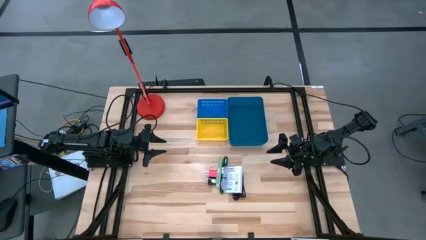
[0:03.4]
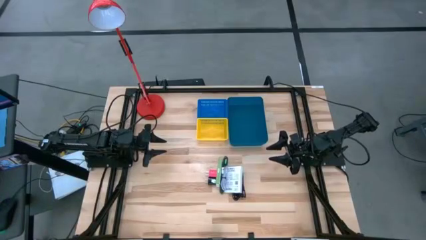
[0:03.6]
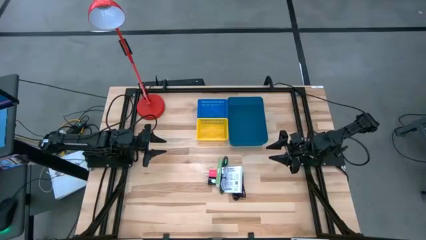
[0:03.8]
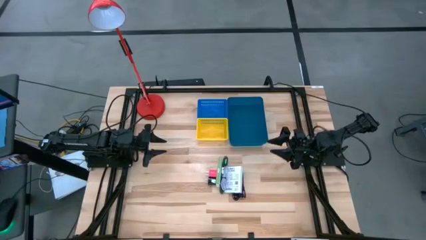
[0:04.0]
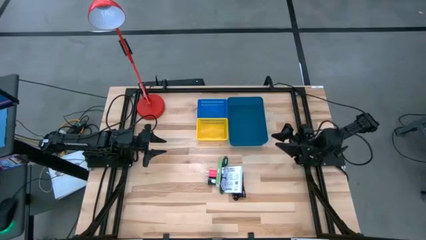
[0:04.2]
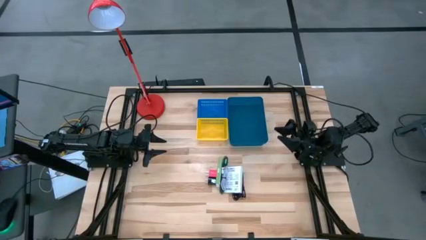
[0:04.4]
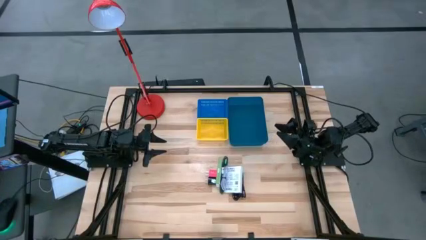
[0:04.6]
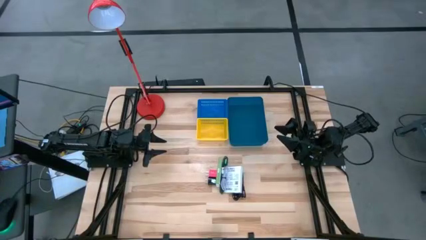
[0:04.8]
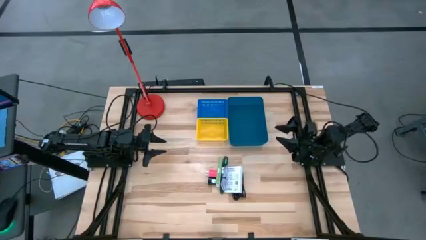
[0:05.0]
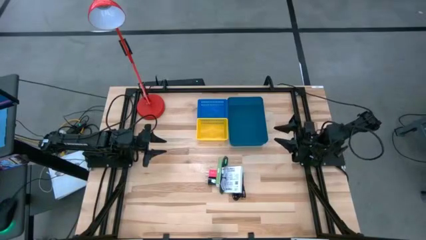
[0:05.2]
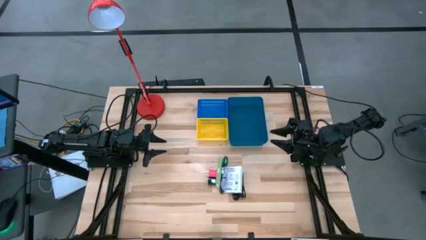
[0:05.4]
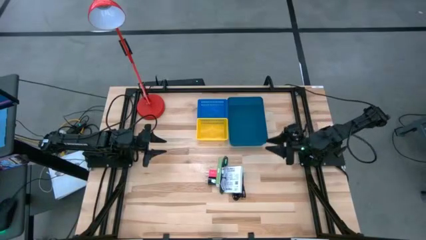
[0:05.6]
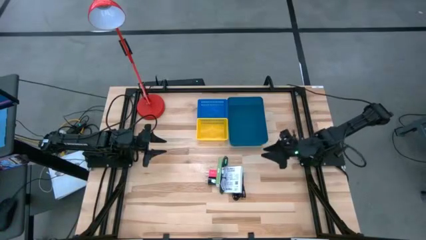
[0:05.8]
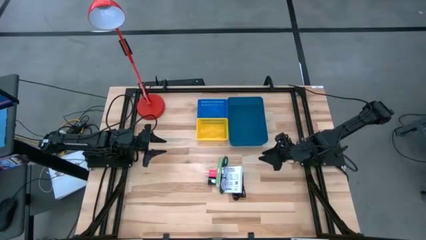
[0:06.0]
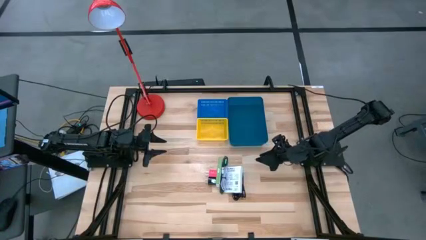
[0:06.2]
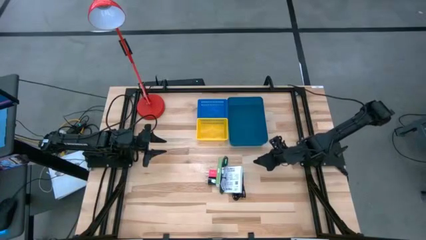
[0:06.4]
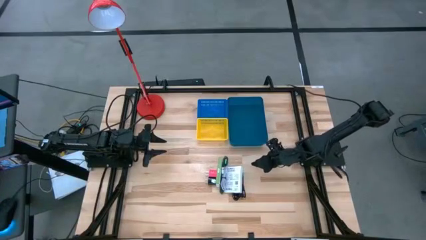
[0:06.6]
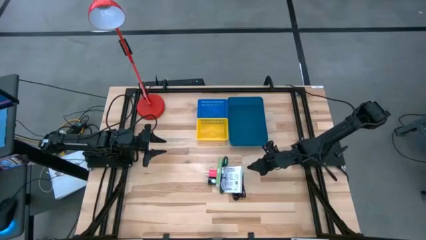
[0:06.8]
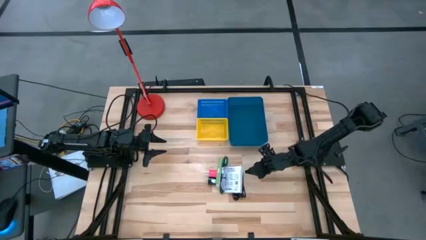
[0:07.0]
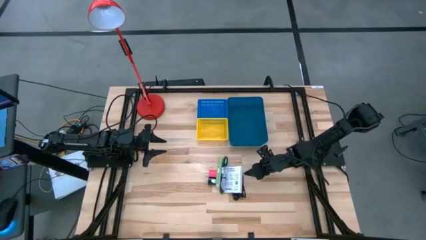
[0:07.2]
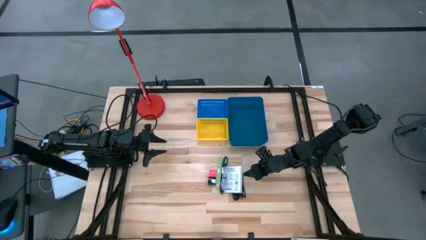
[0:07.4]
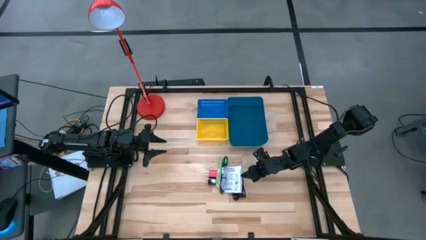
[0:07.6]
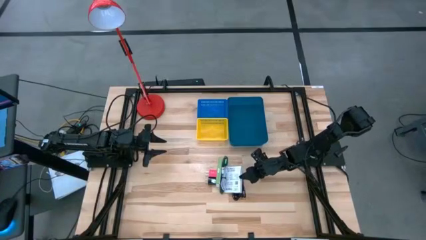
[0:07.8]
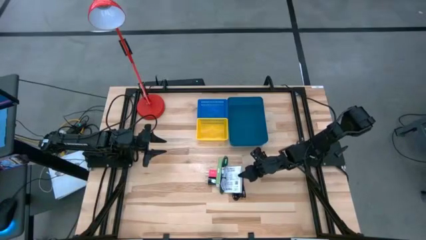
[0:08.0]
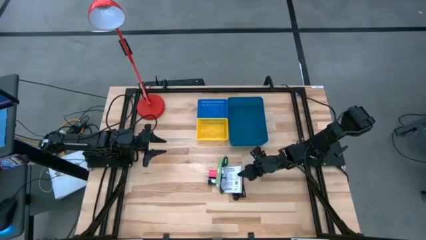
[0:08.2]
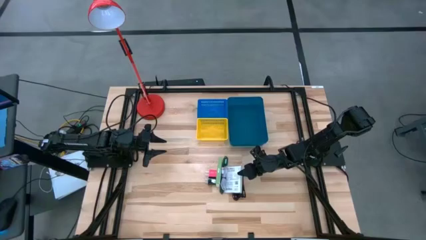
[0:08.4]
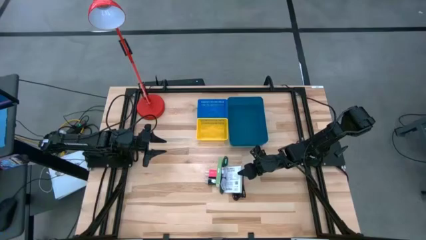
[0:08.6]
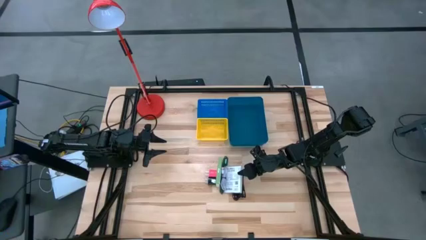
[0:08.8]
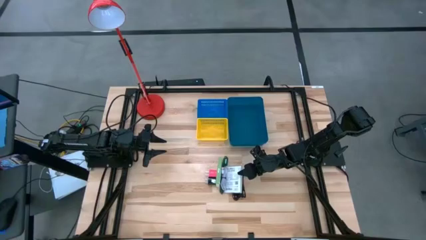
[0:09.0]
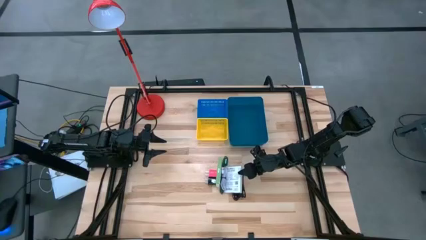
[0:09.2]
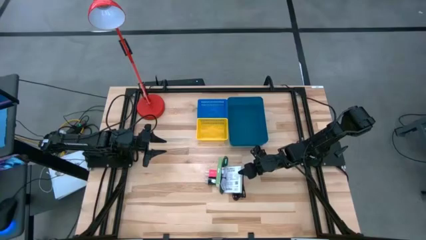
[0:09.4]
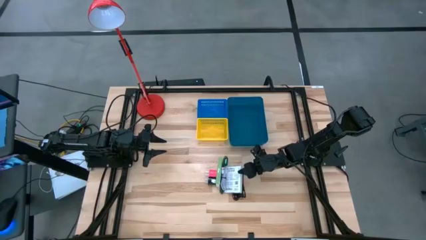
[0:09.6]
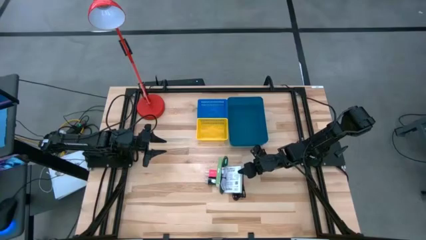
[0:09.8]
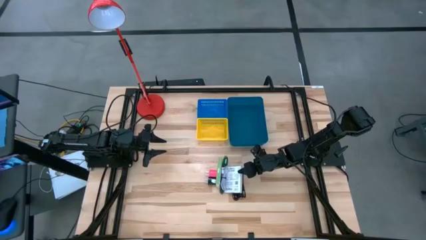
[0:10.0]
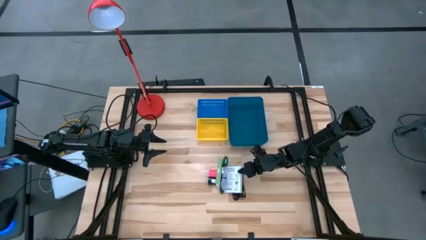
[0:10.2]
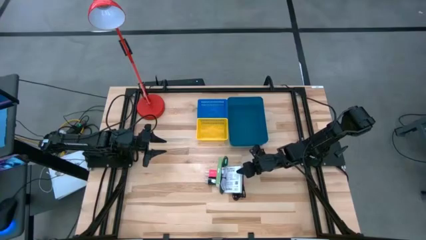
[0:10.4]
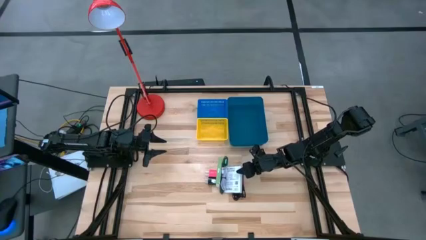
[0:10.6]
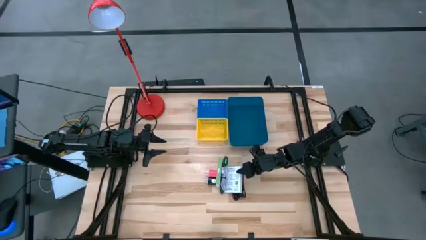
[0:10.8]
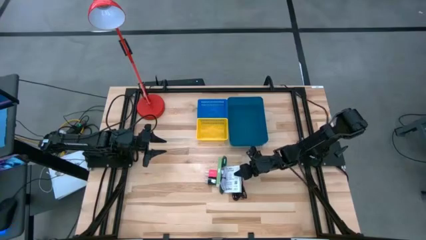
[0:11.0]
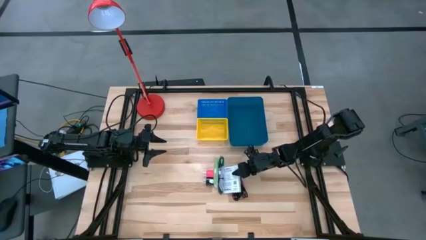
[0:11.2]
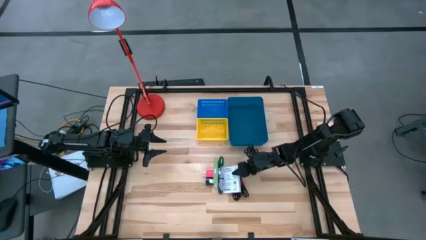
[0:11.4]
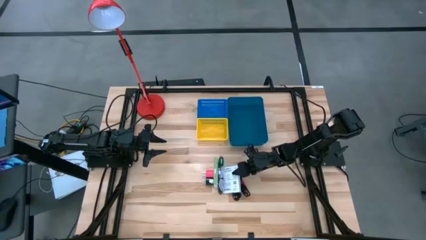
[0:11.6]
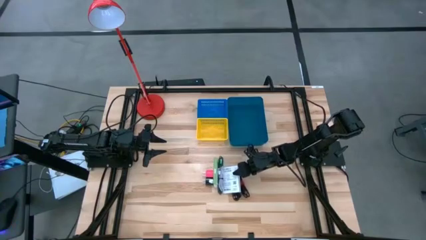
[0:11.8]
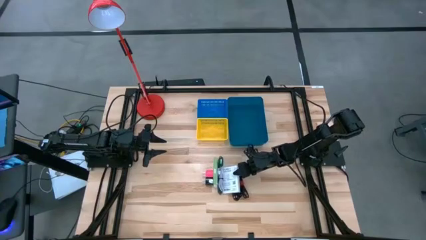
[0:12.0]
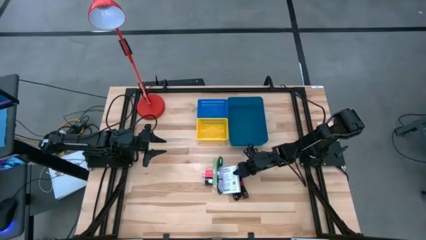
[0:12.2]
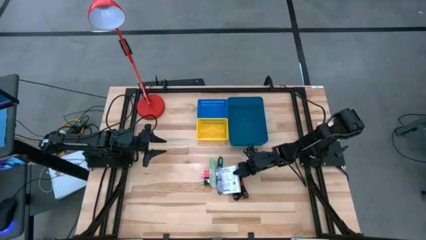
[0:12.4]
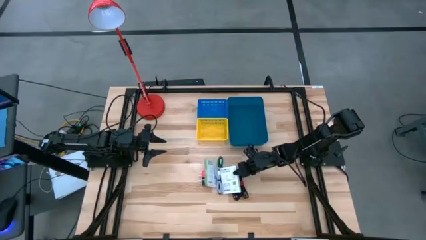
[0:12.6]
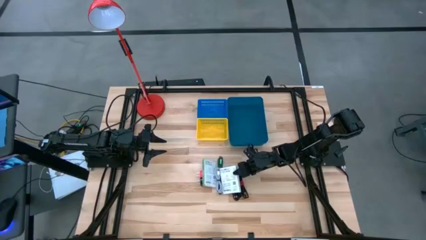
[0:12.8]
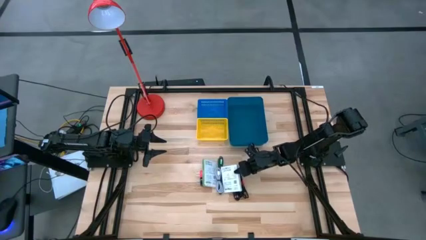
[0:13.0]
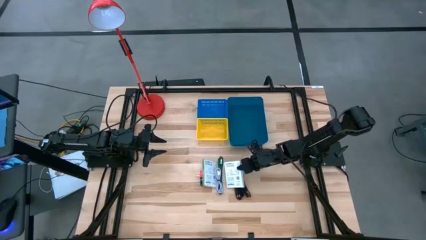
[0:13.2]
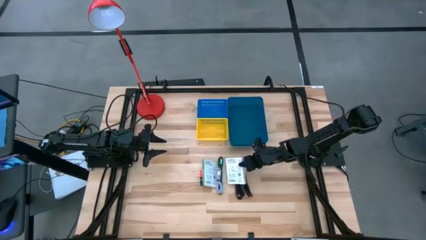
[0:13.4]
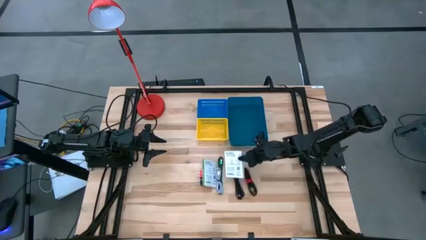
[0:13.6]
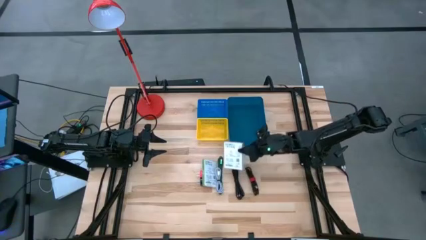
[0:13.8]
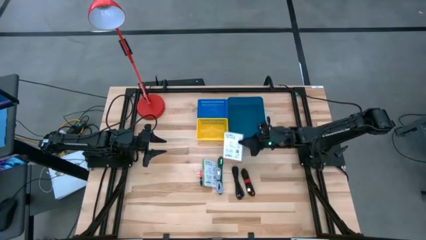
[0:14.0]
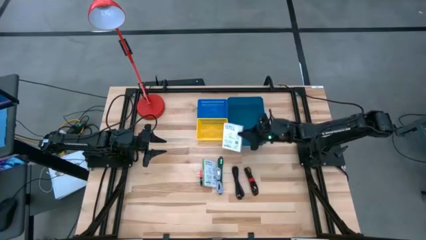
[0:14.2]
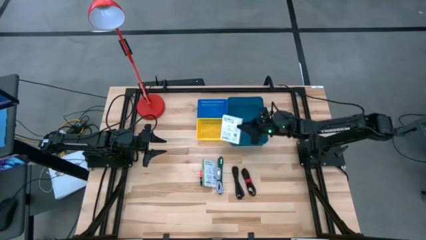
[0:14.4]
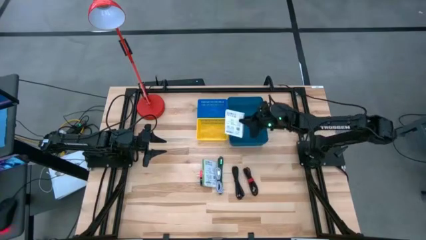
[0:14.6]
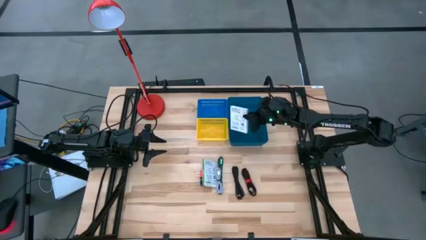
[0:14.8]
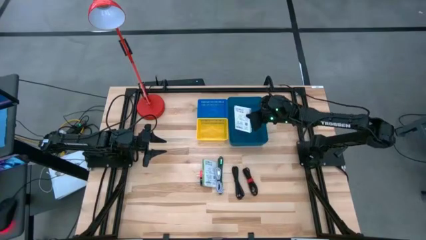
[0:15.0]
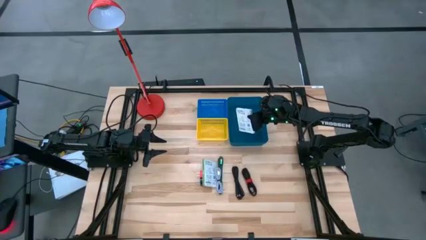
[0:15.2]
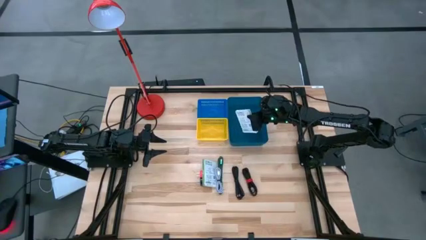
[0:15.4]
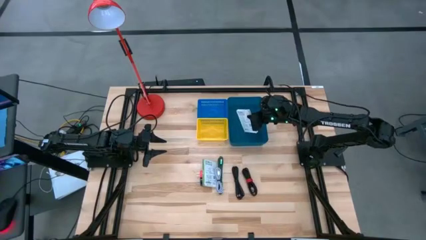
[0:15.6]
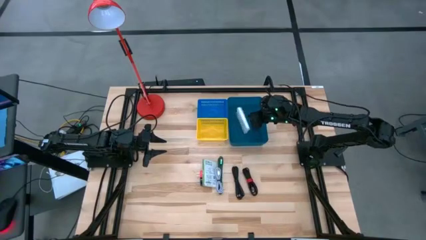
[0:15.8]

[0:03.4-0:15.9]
Task: Pick and place items into bin
Put the right white cardreader box into the dark blue bin
